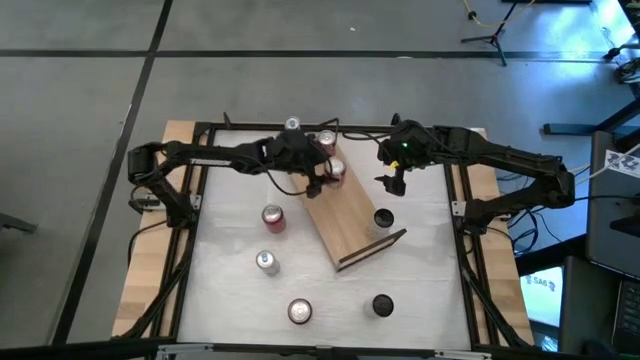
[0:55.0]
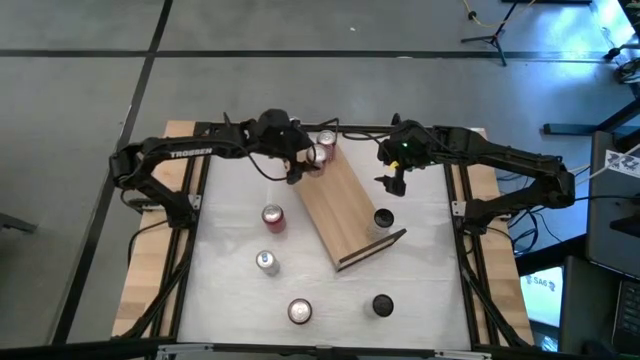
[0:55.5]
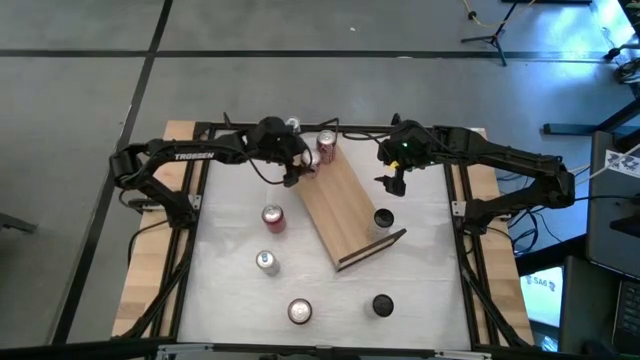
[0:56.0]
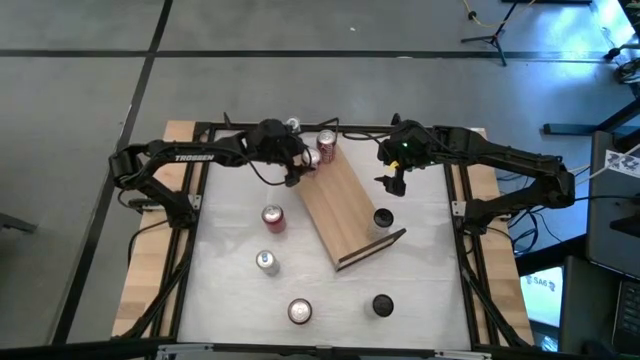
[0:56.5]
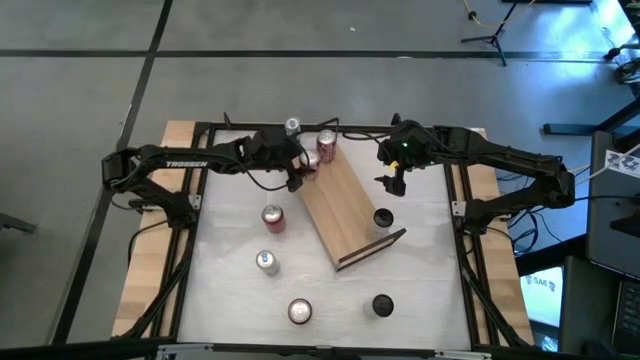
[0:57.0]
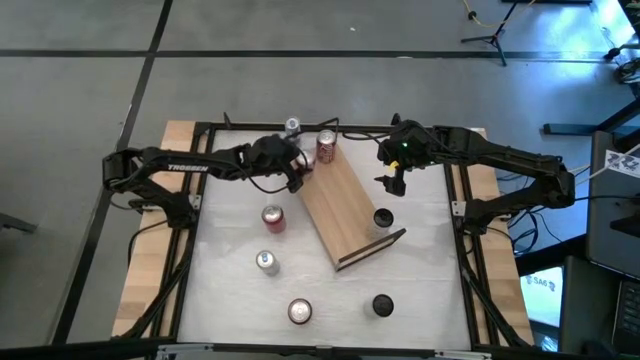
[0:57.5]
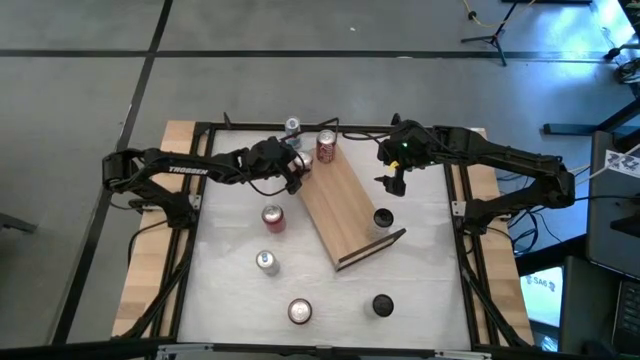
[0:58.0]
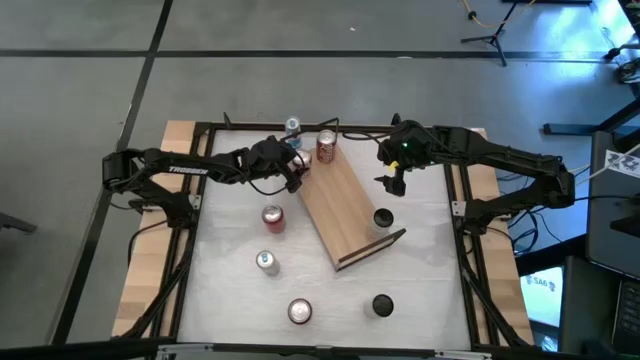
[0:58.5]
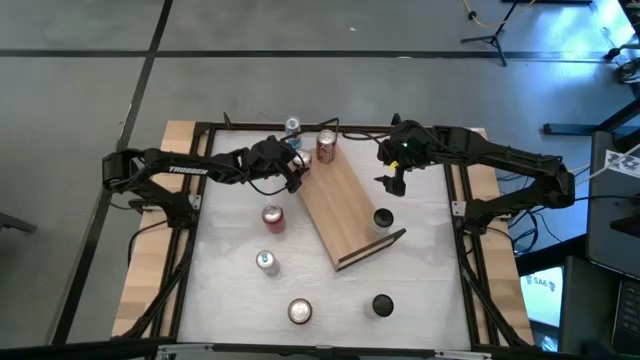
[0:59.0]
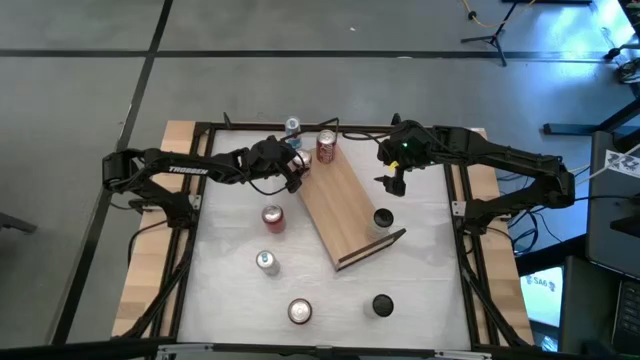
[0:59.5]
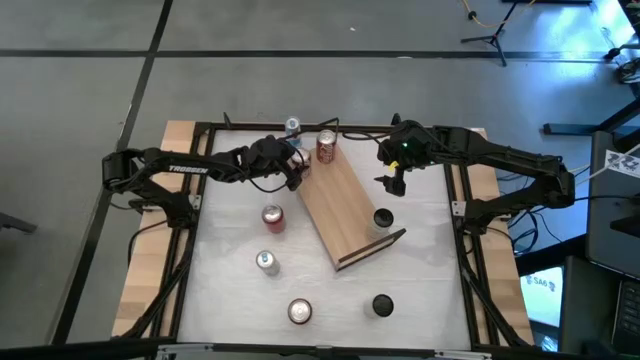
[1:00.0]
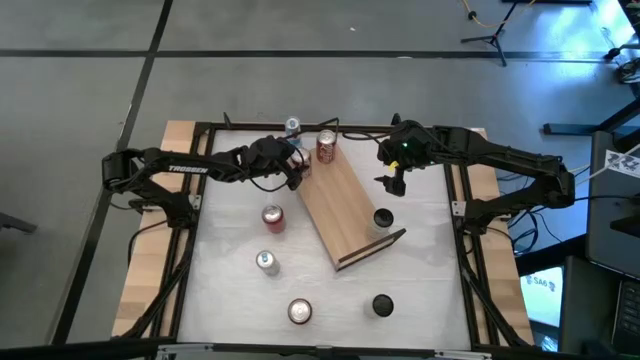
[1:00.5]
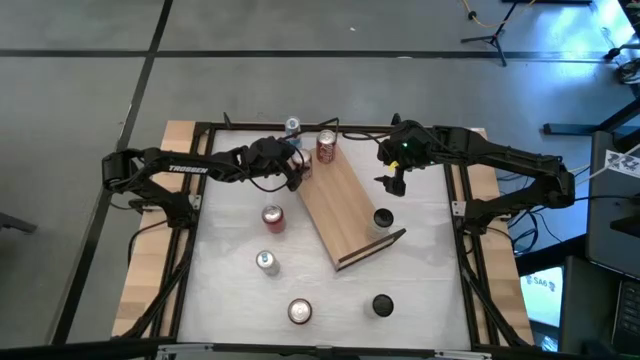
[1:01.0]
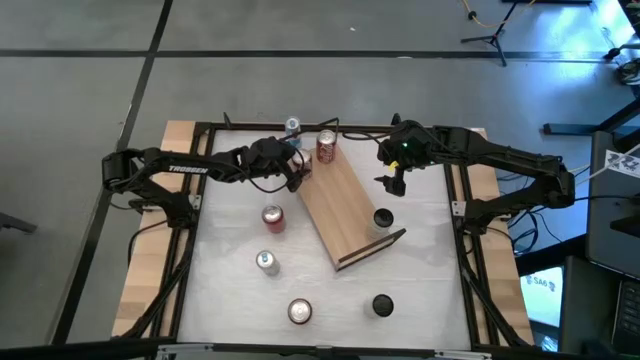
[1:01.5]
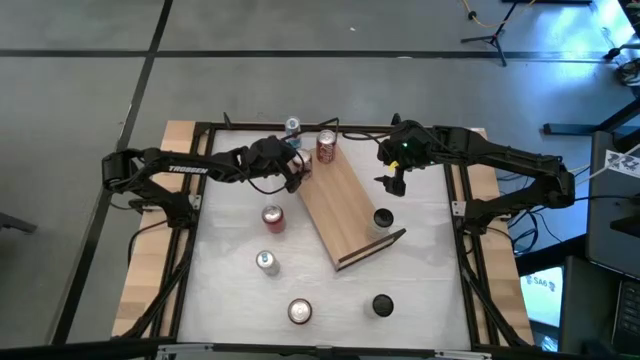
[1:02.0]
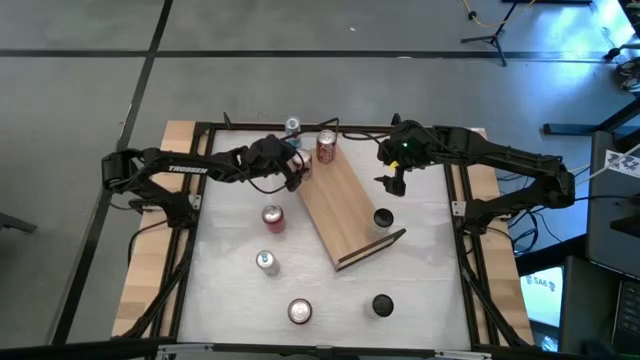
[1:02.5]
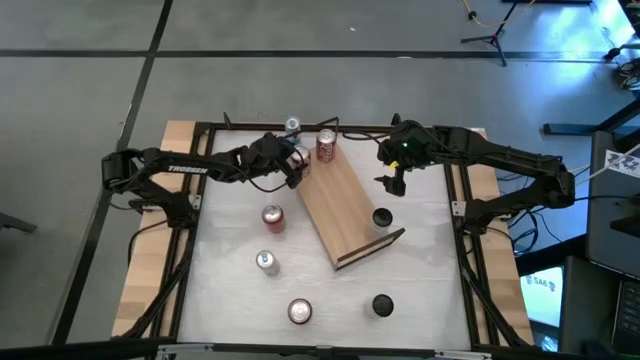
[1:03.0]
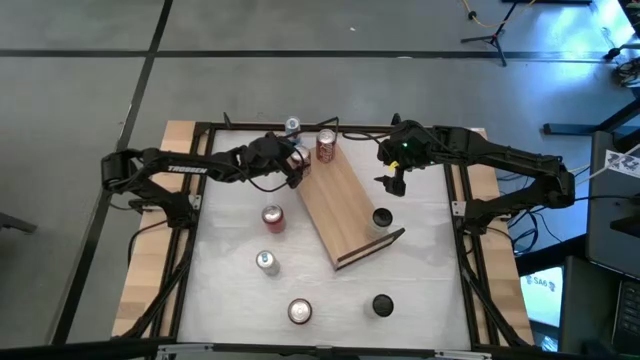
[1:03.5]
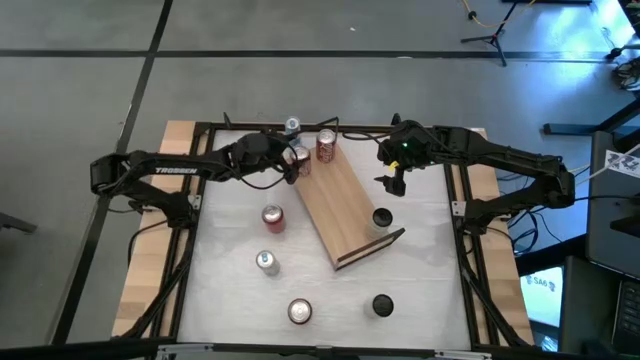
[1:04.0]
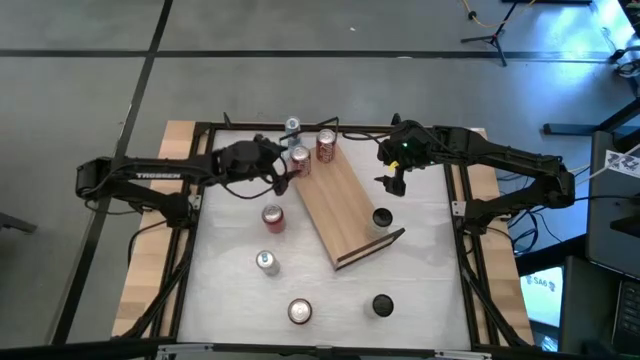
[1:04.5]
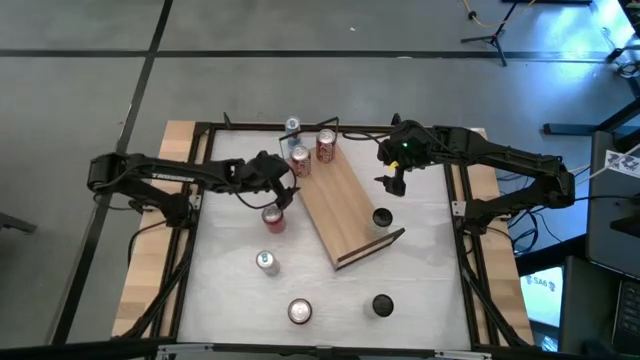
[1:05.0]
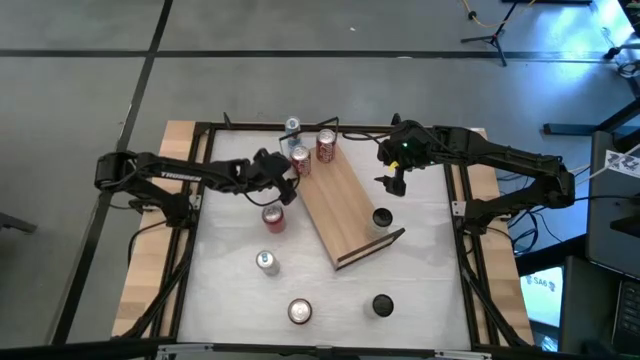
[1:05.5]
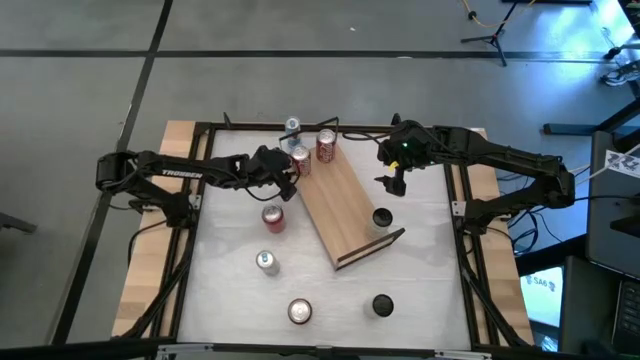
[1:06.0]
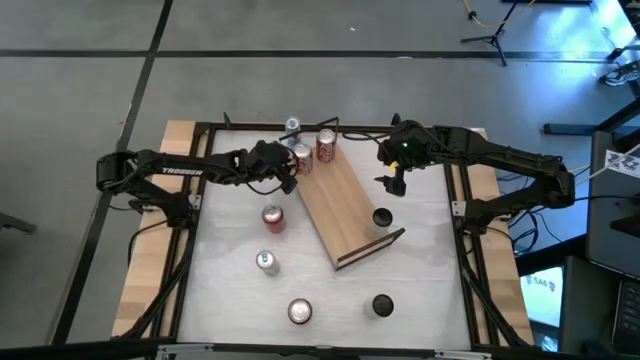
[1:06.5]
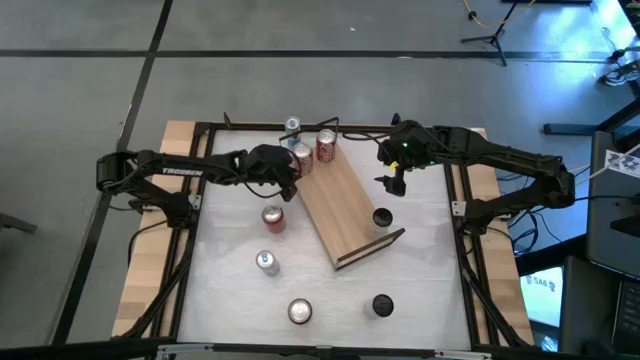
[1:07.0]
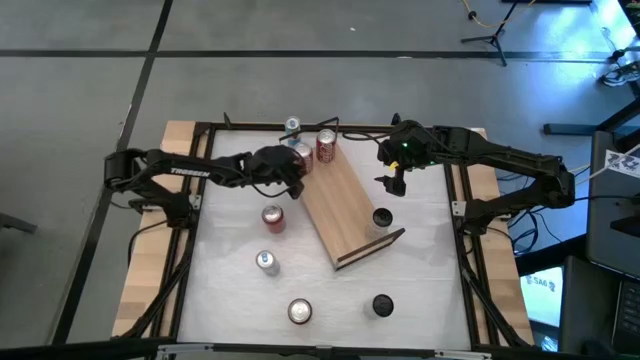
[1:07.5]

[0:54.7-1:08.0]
Task: Place canned beverage on shelf
Put the red white soda can on the shelf aligned with the other red white soda can

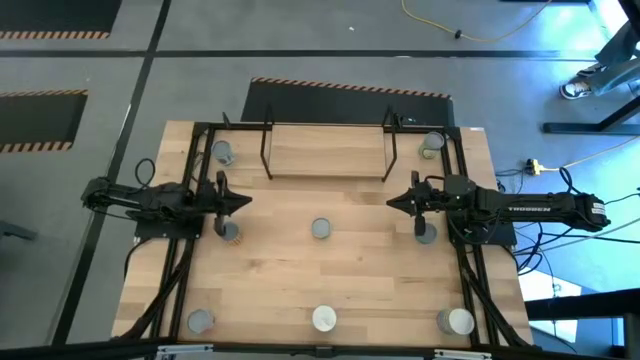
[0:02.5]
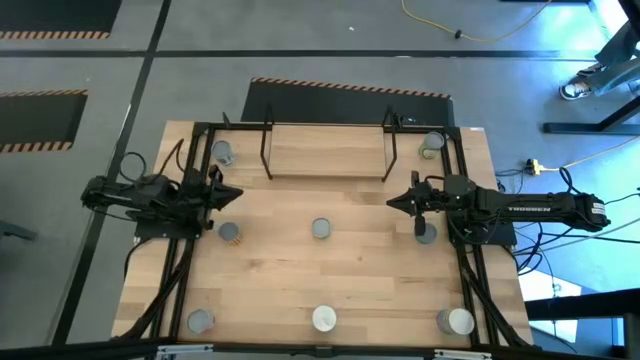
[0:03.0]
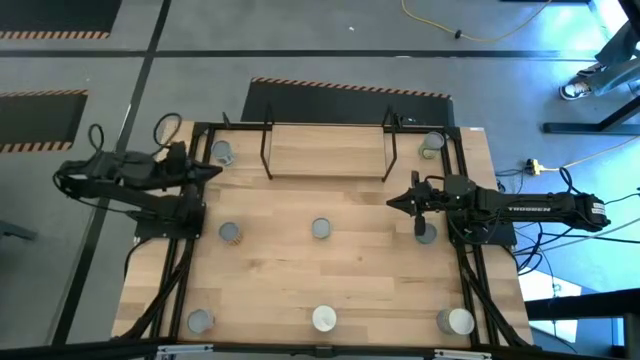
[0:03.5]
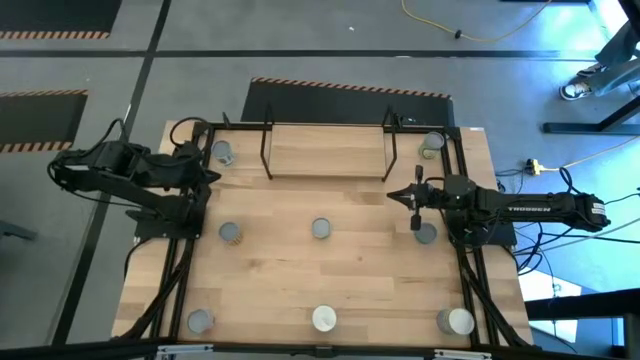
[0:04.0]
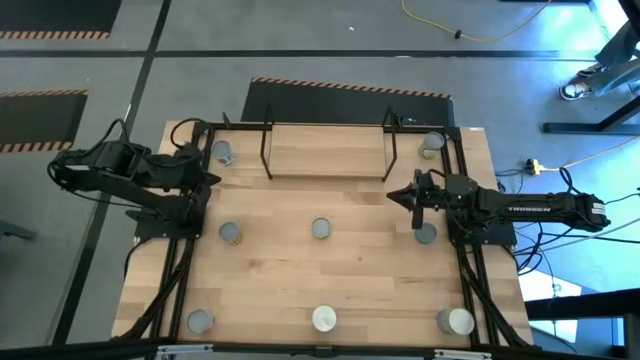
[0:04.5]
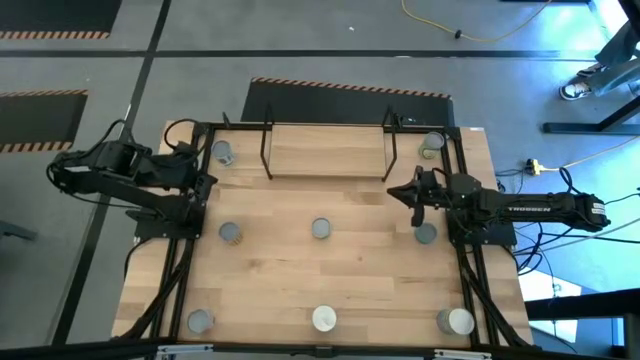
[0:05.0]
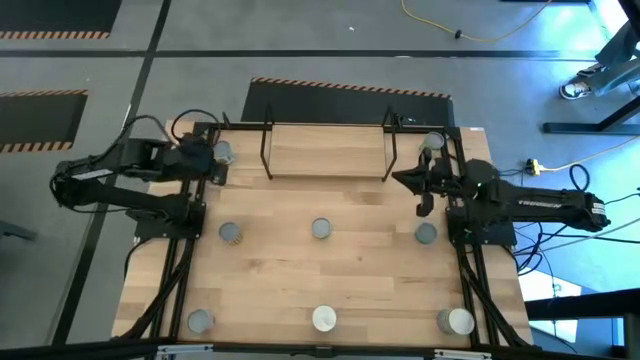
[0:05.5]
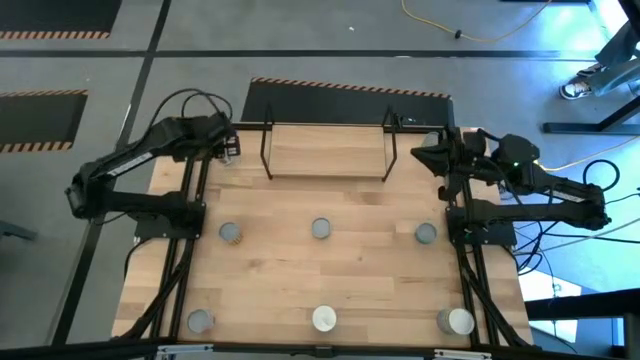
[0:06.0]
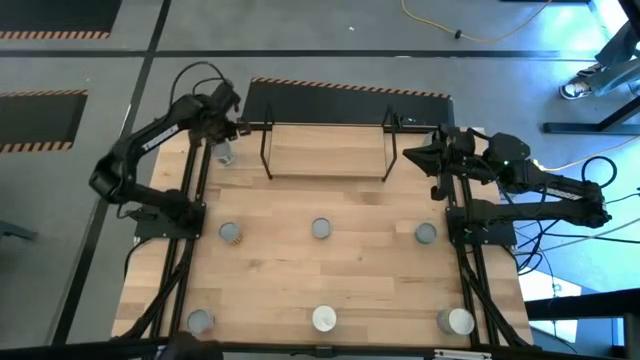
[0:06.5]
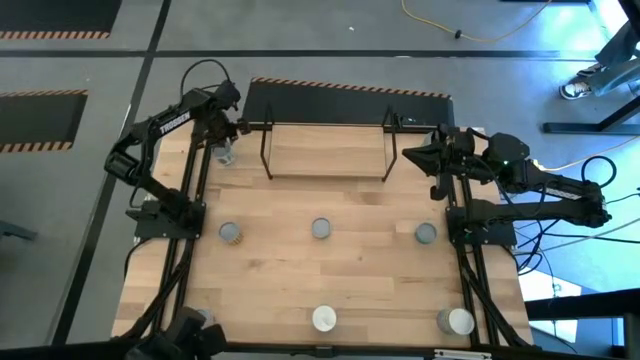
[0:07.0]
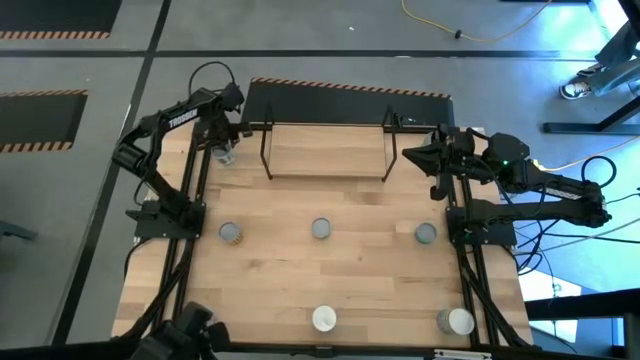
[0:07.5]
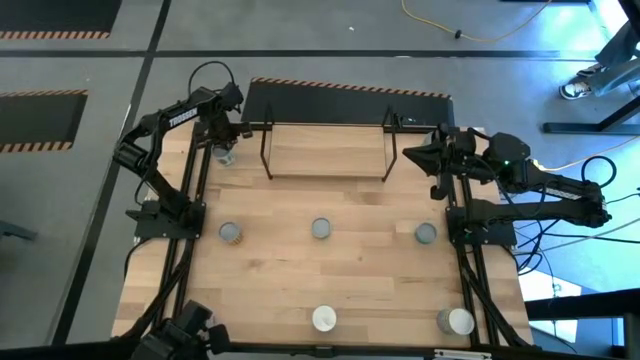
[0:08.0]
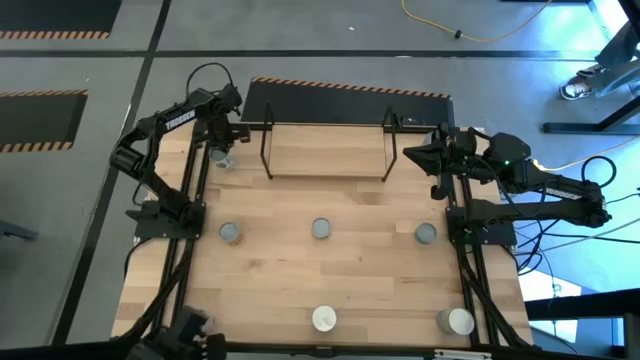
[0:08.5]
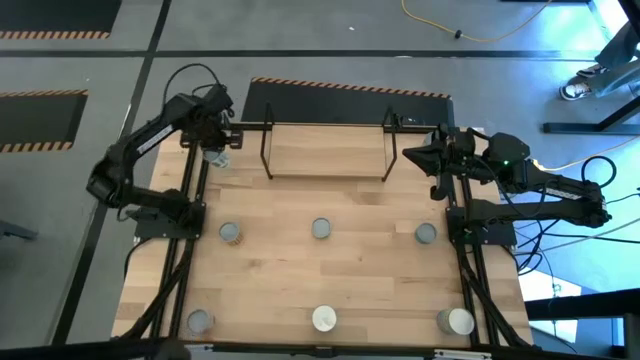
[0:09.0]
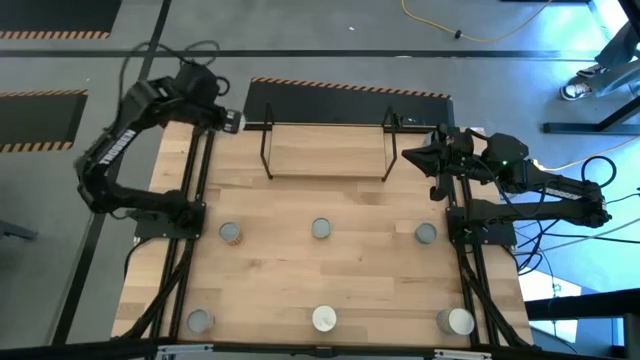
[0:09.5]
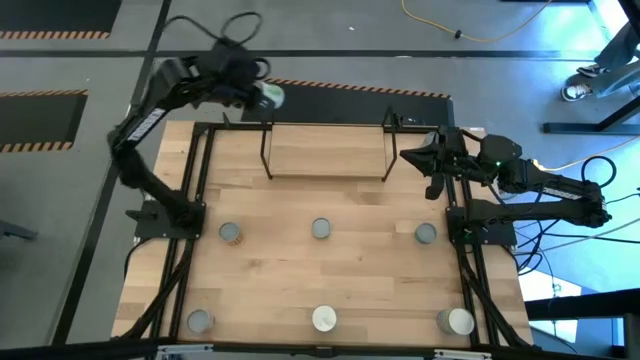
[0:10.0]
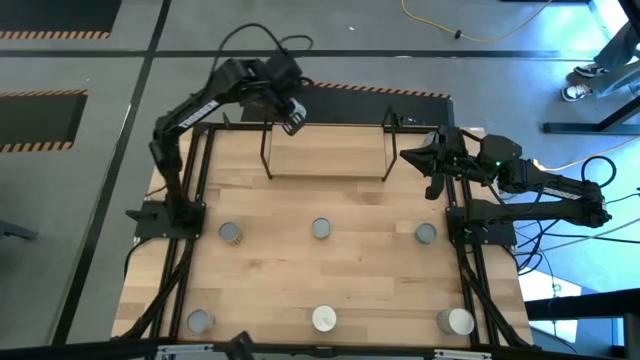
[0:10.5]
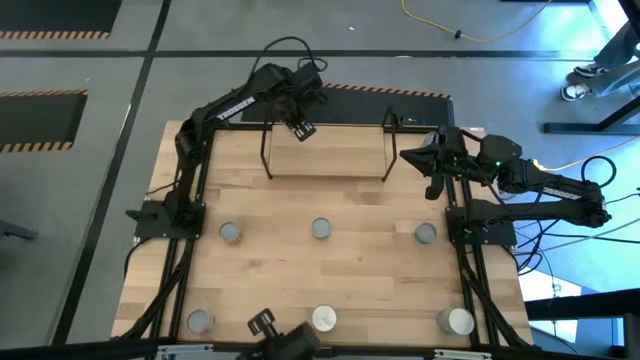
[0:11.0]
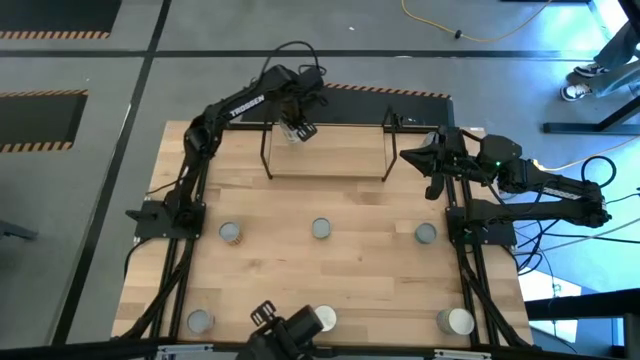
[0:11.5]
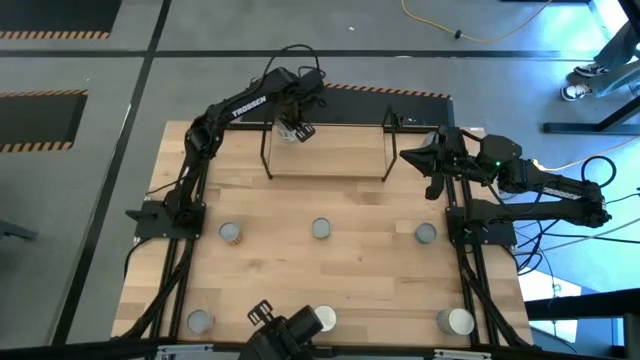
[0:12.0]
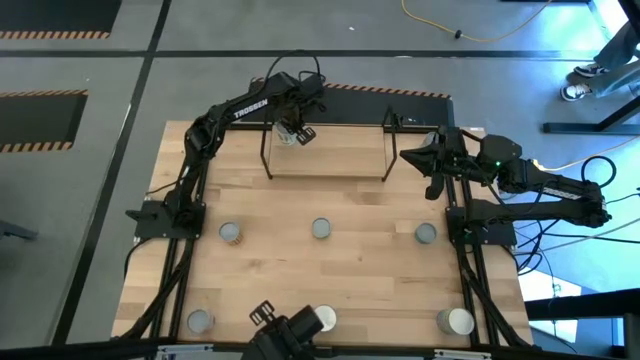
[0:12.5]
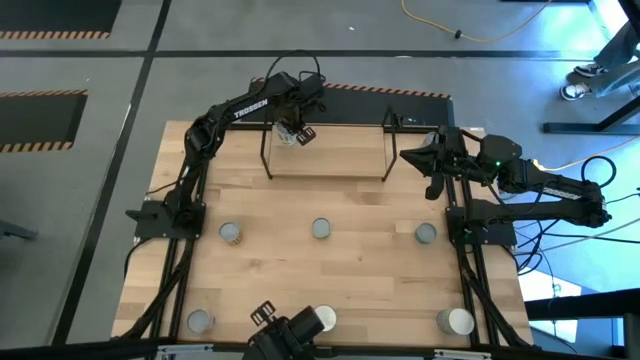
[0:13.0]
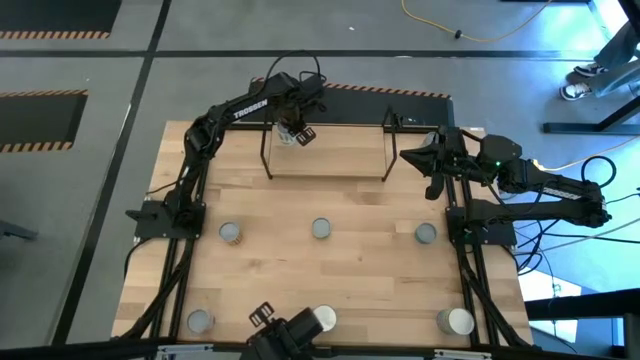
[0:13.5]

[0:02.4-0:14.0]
Task: Pick and place cans onto a shelf
Put the white can on the shelf
